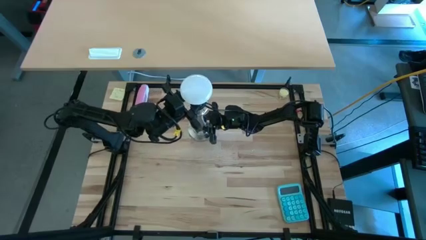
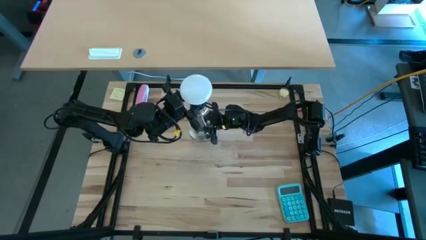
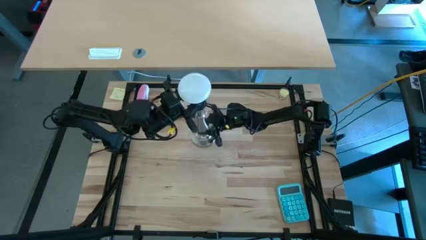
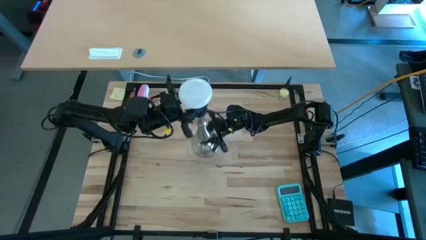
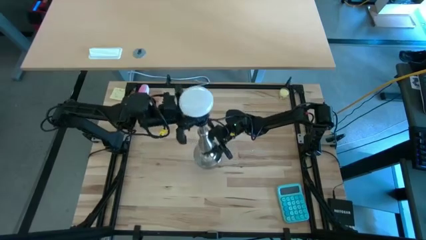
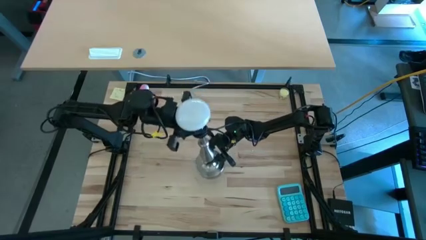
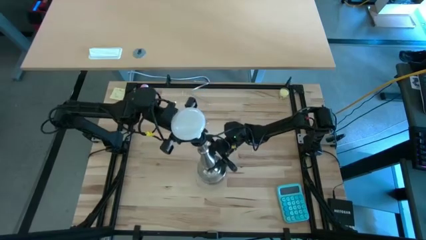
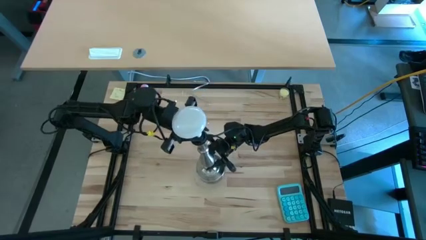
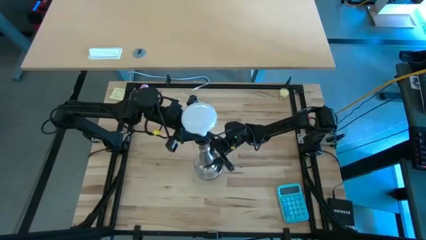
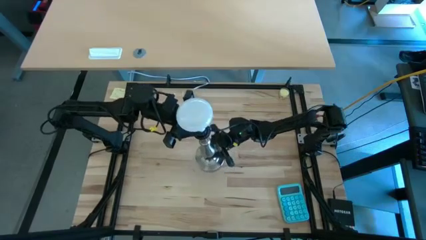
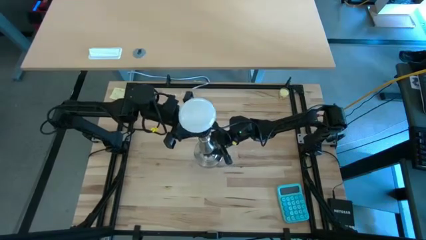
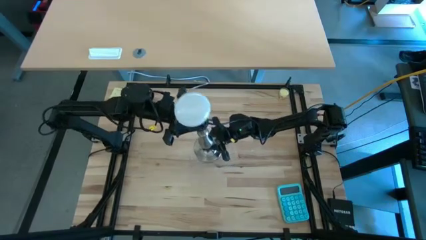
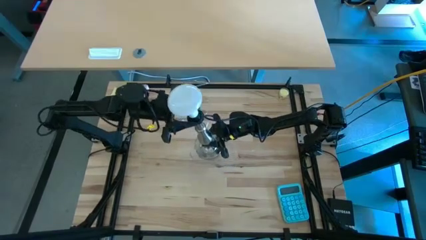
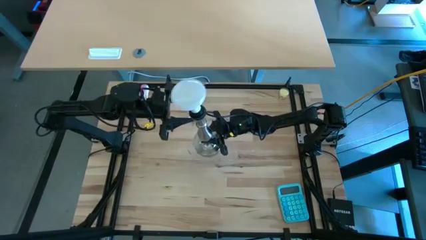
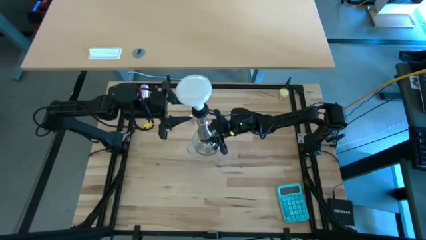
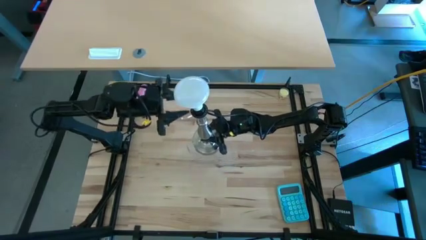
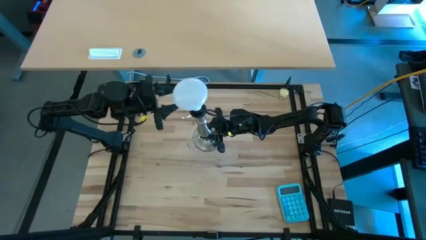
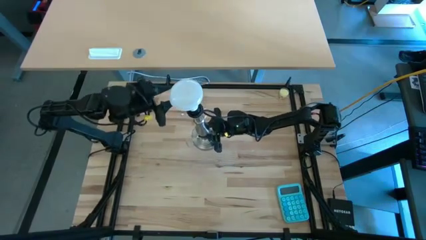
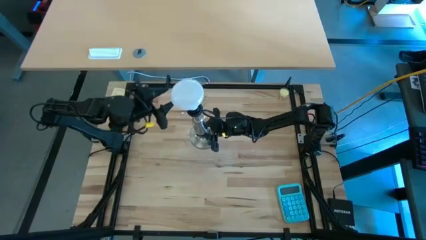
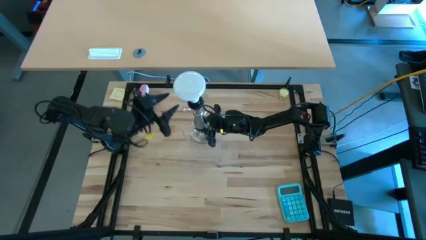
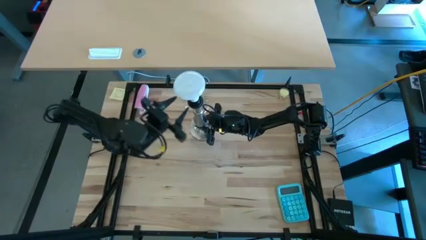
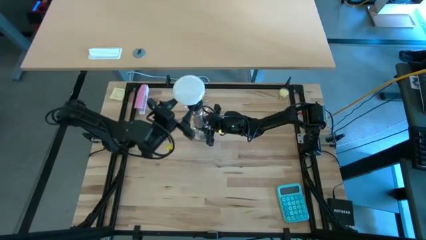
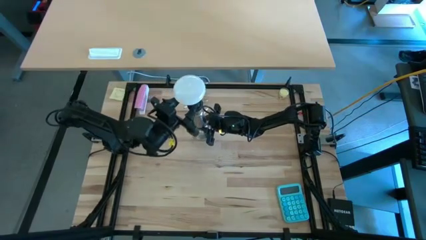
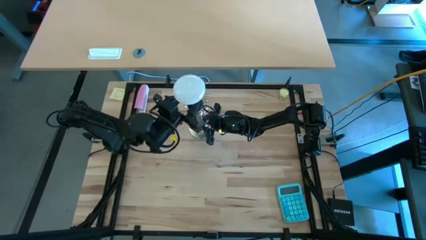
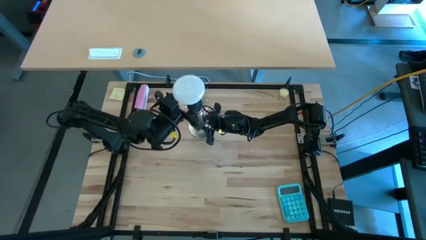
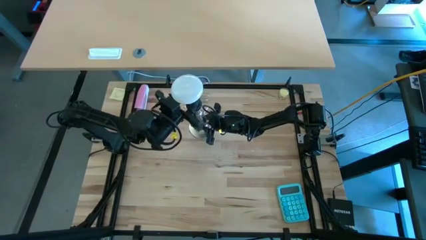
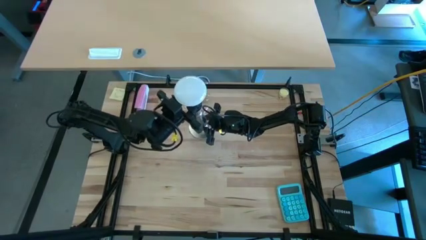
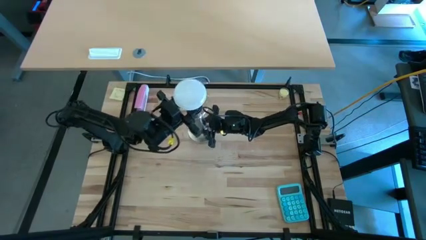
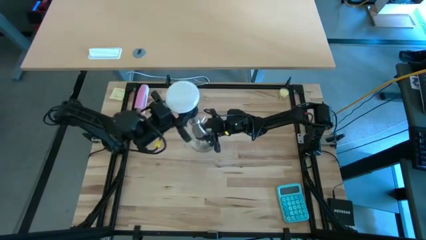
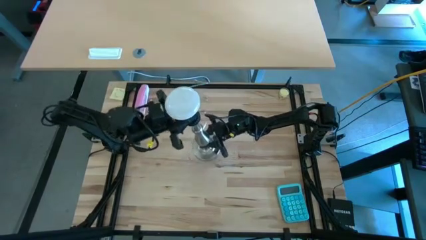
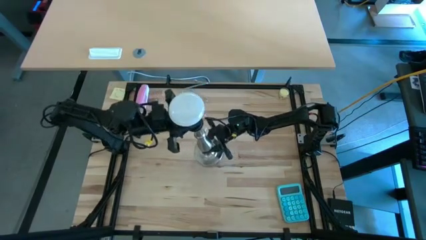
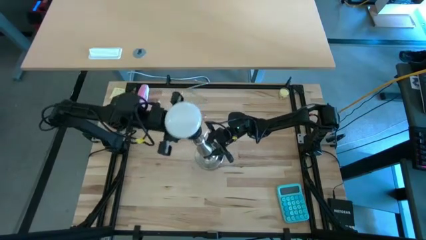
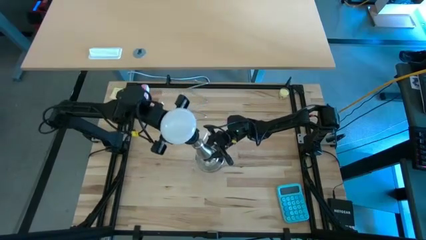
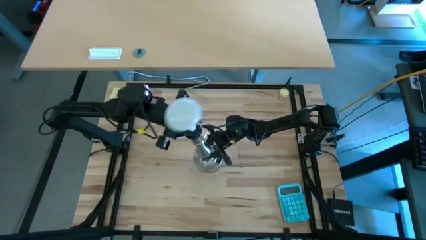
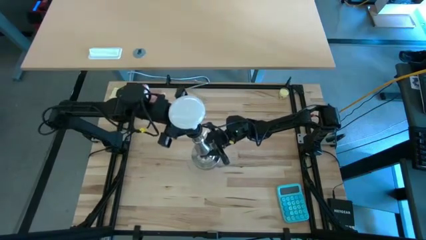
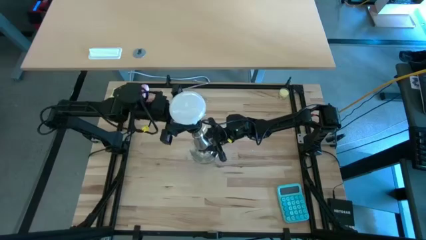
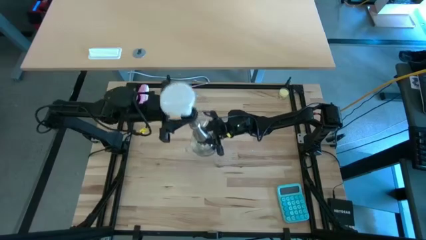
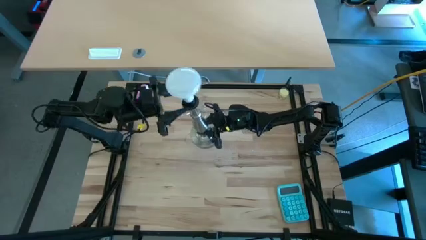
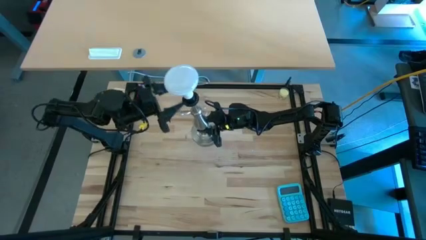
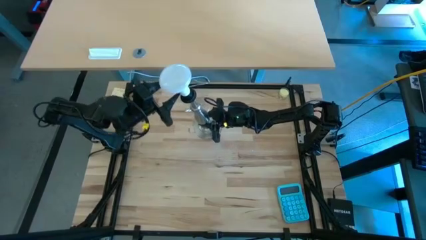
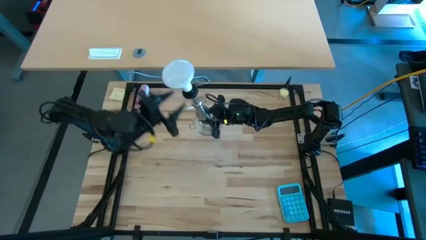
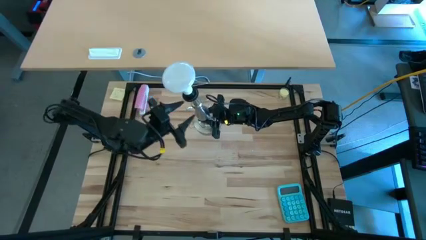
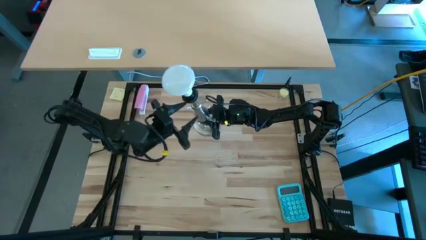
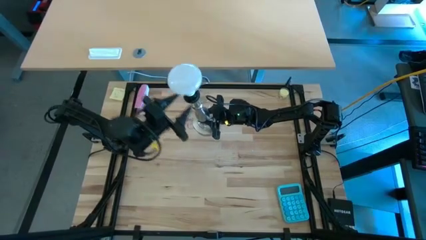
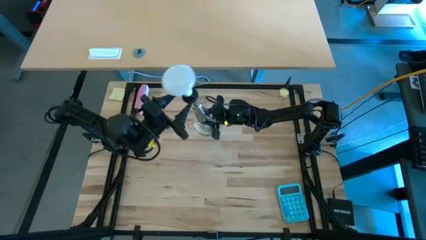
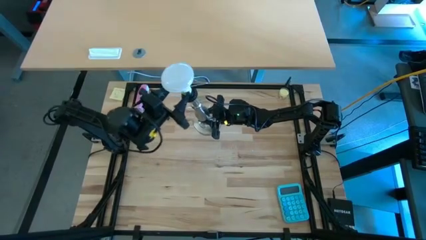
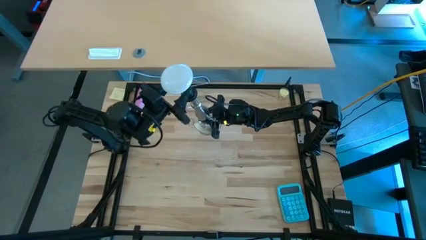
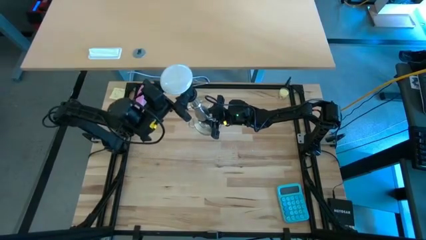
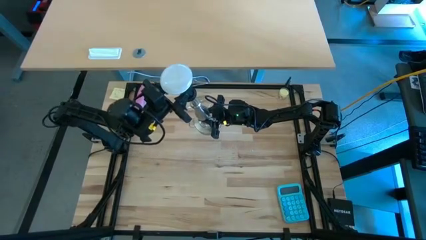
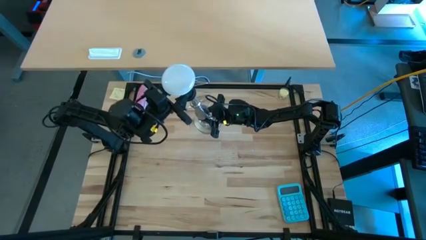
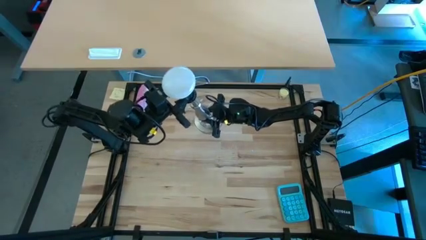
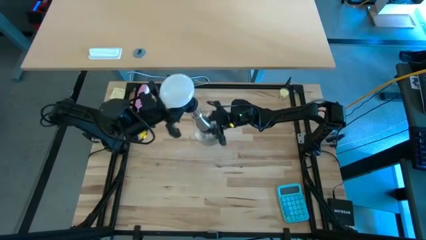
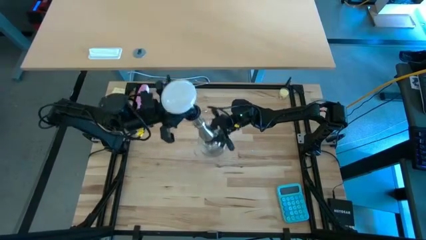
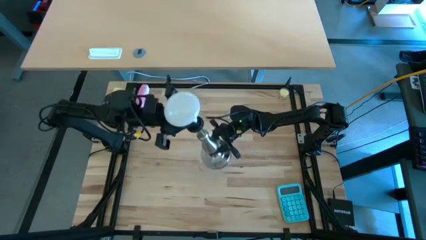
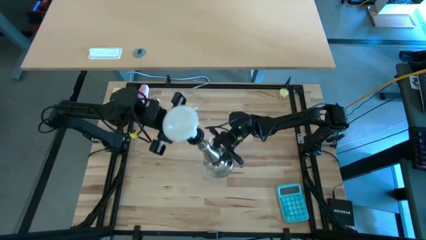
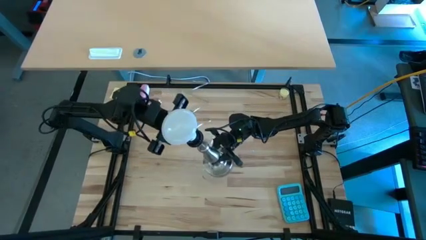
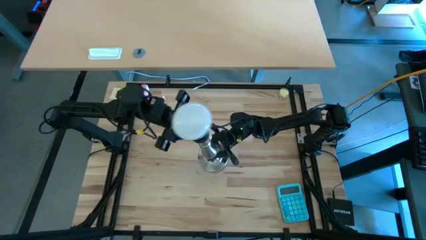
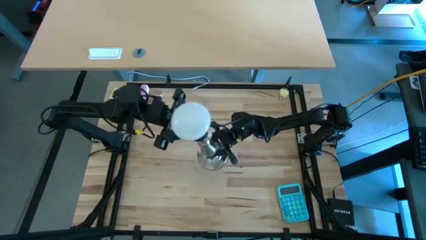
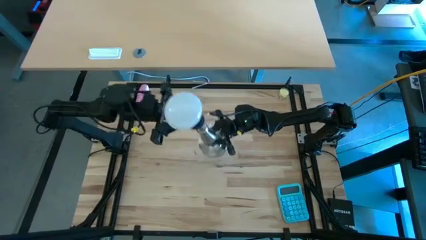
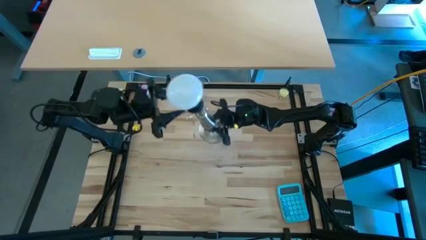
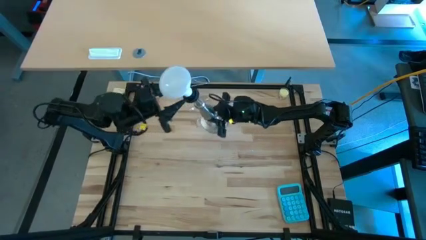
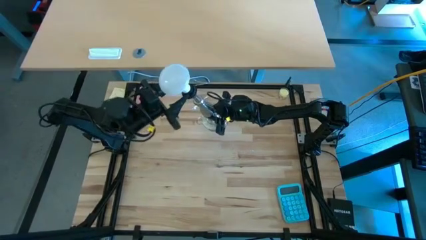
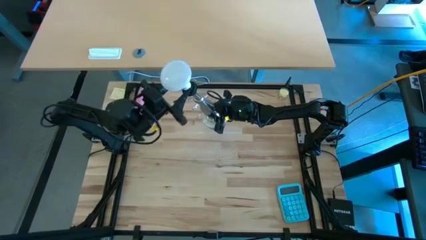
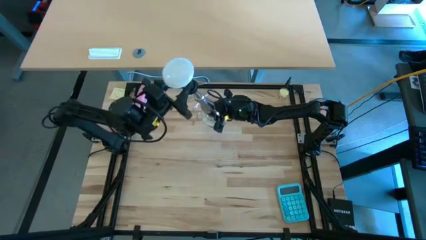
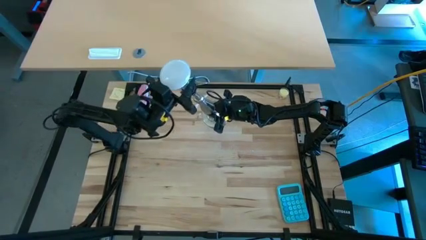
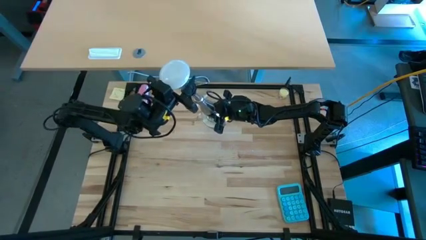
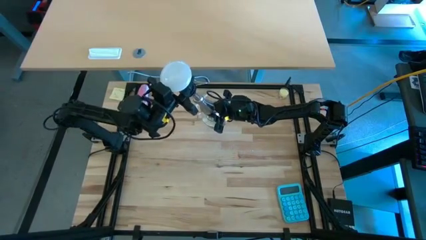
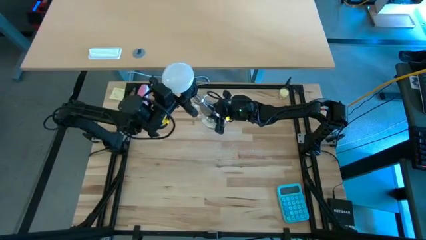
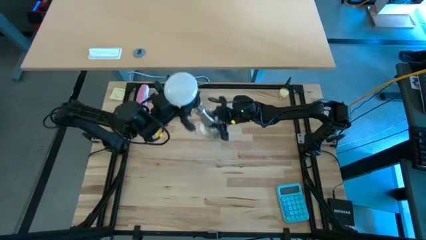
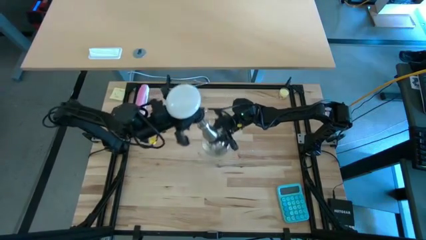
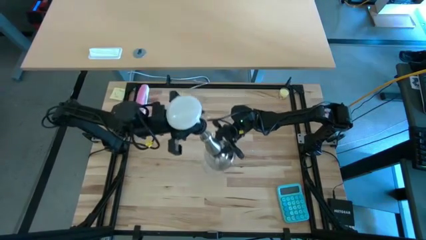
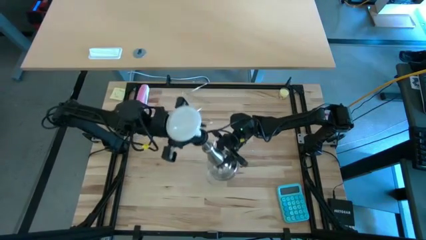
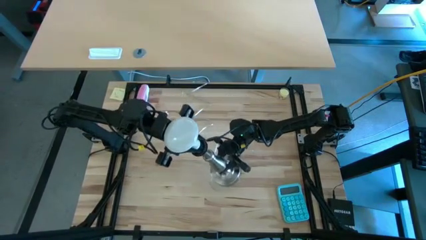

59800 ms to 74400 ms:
Task: Screw lightbulb
Insert the lightbulb into the desk lamp
